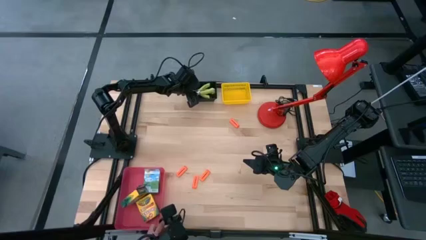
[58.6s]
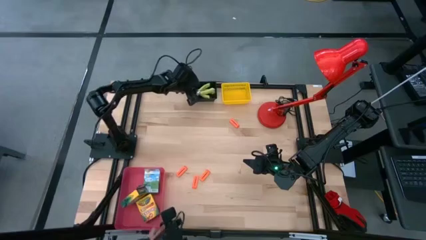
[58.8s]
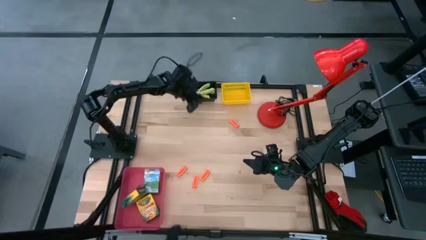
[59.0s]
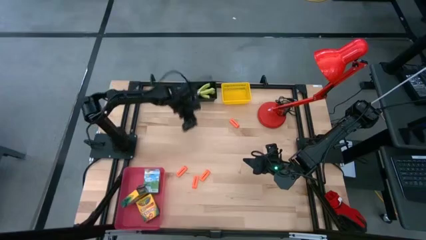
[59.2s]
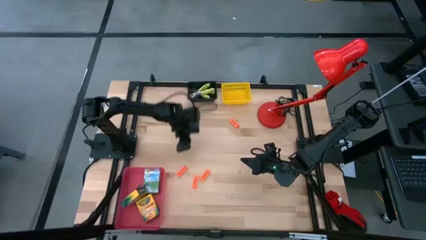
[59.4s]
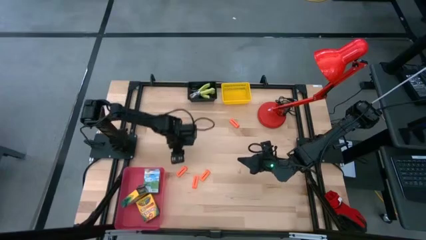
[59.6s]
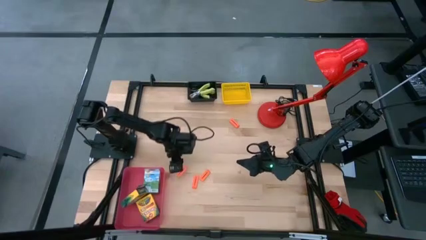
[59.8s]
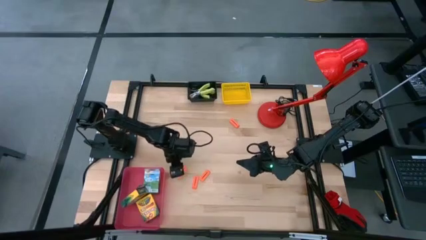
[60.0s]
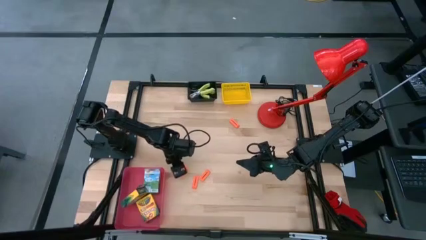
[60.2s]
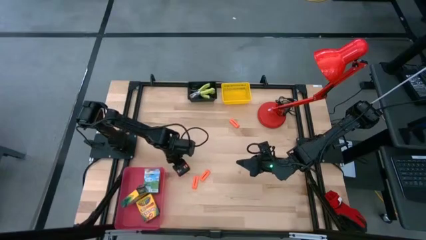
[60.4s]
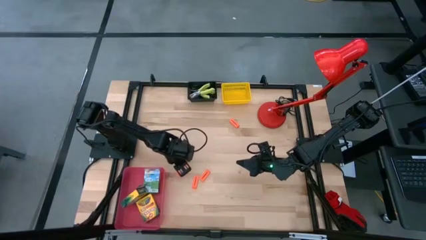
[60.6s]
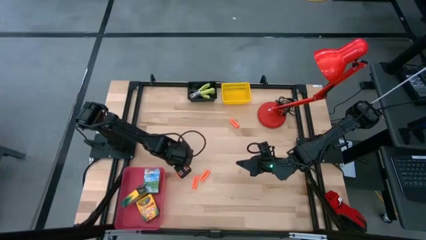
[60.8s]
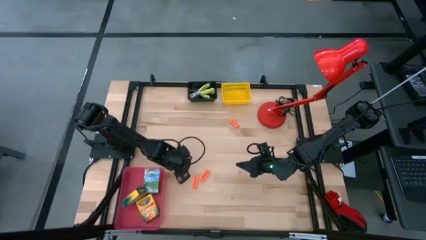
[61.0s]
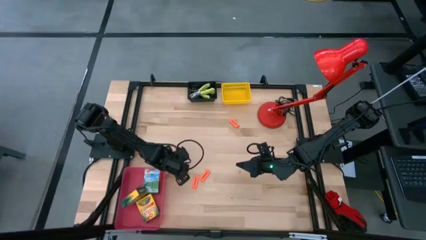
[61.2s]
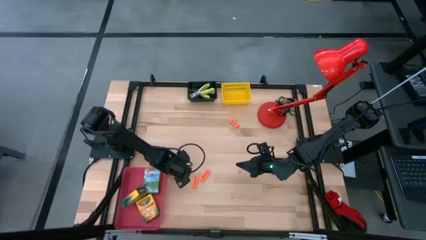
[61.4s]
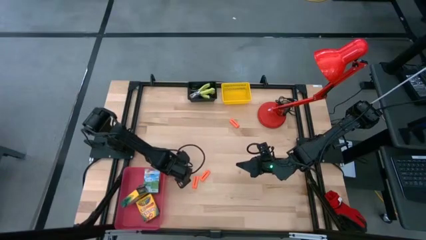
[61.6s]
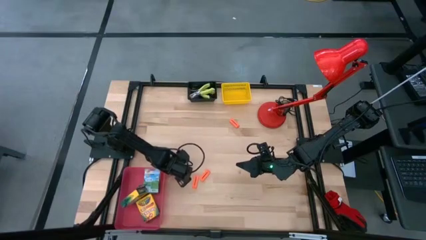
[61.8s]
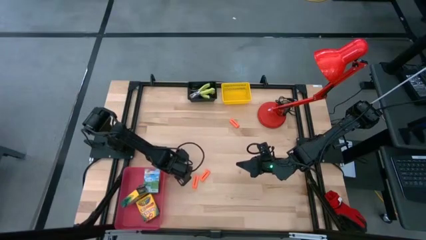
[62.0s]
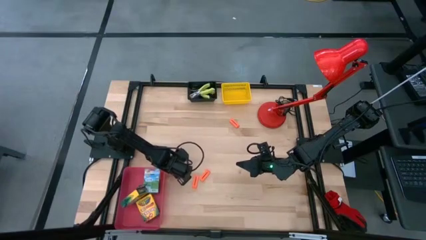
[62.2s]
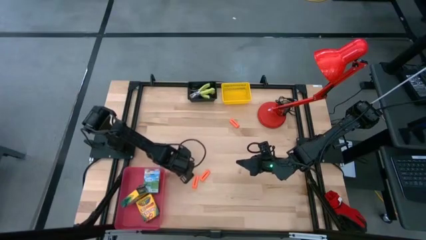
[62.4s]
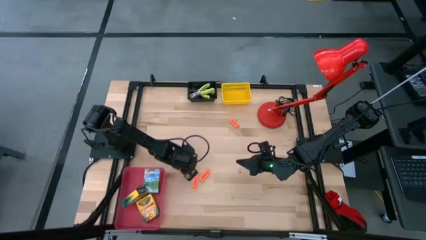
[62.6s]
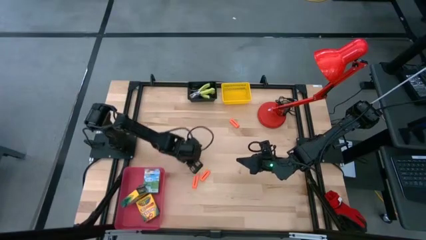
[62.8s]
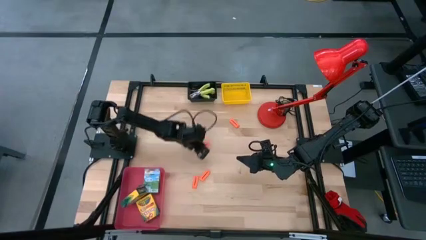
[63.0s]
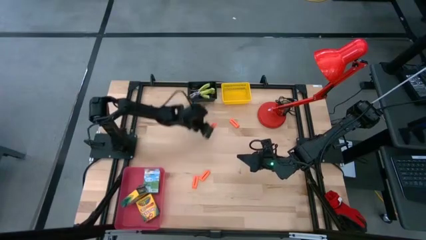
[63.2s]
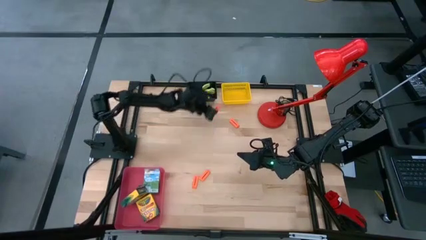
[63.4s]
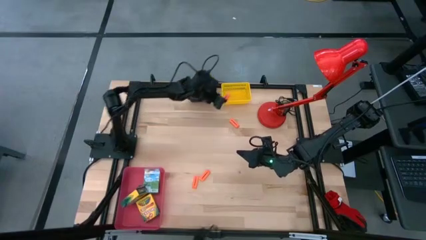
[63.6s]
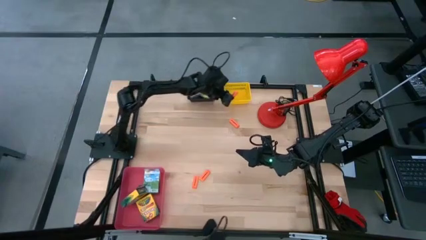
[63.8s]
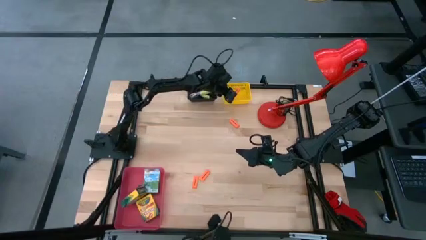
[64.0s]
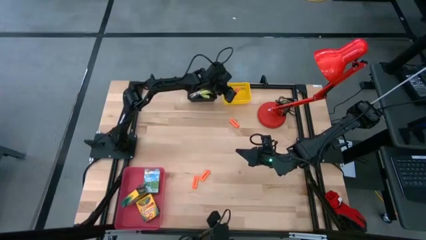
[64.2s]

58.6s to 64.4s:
Task: Pick & Place School Supplies
Put the orange eraser into the yellow bin

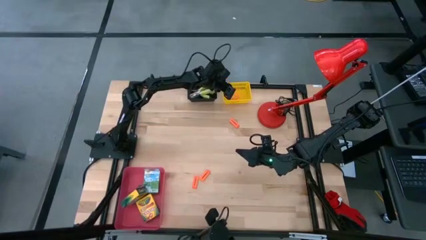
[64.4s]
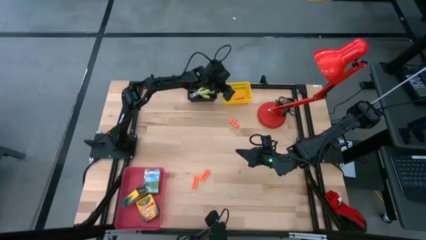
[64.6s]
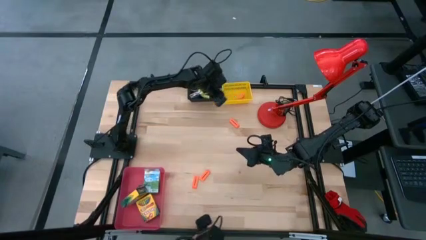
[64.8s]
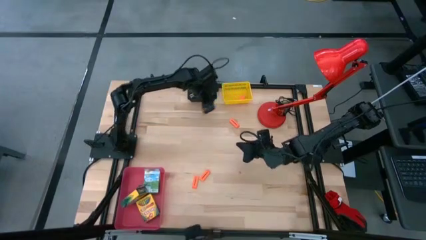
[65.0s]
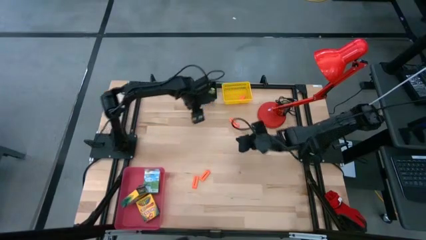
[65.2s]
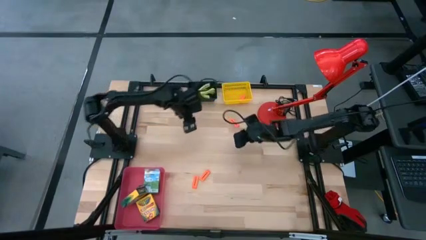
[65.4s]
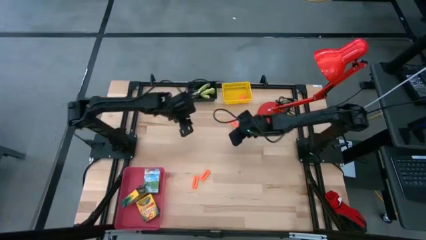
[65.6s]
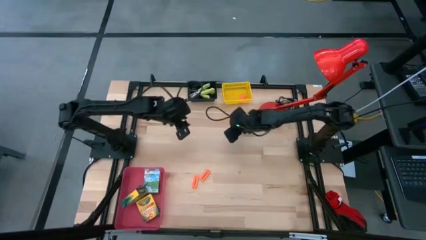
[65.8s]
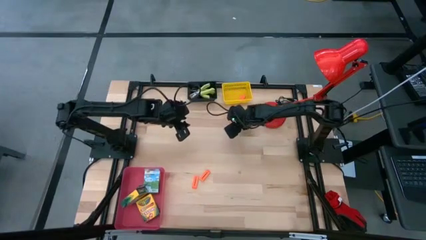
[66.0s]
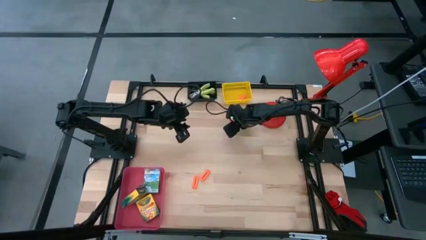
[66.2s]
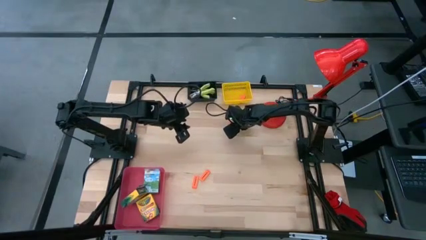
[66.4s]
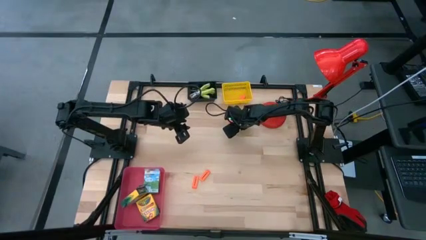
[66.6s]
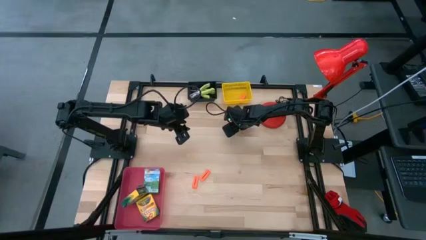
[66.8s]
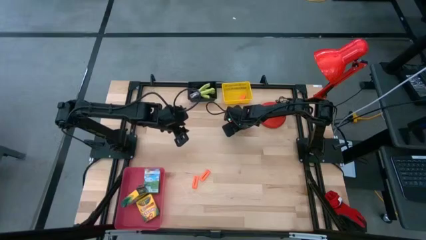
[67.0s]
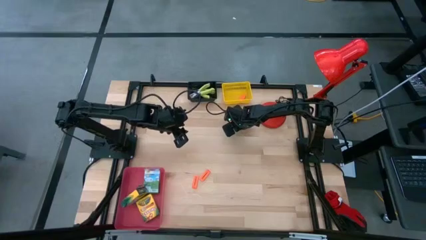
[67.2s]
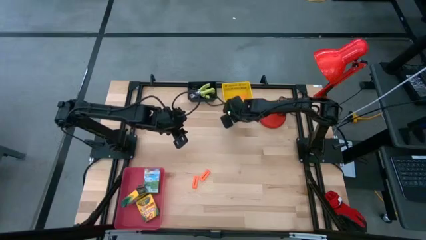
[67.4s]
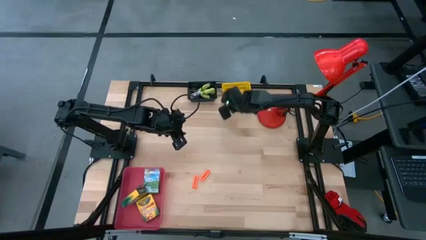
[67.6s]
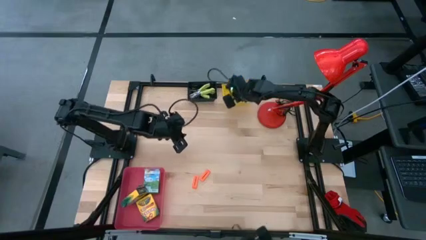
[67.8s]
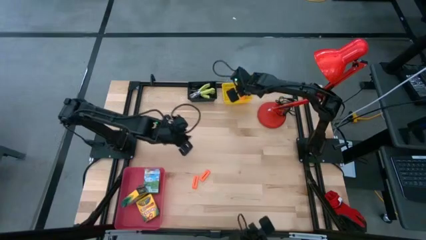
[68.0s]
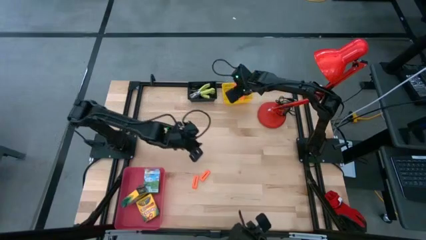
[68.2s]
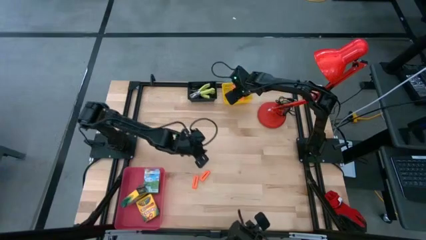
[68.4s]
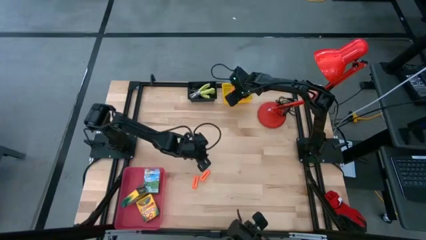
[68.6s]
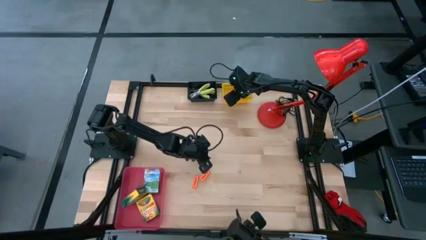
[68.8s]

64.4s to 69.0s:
Put the orange eraser into the yellow bin

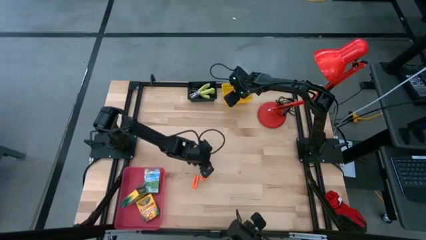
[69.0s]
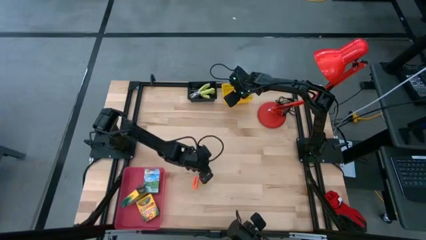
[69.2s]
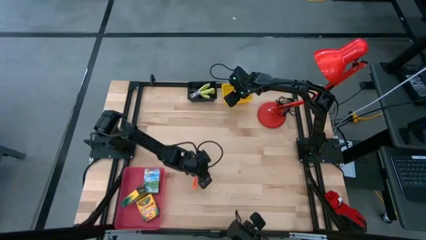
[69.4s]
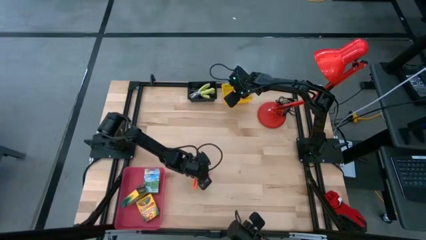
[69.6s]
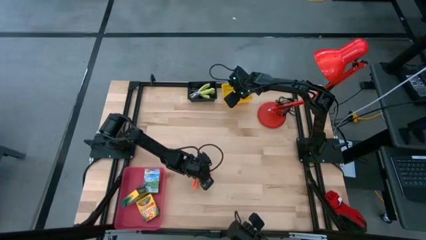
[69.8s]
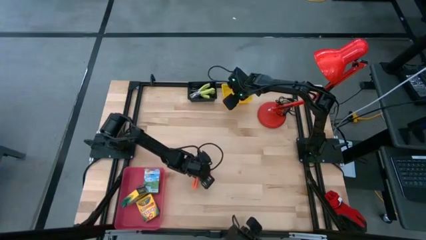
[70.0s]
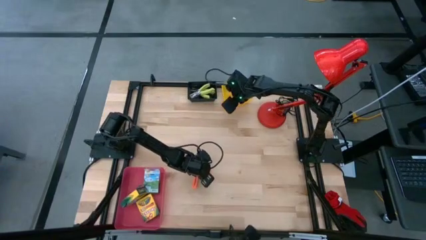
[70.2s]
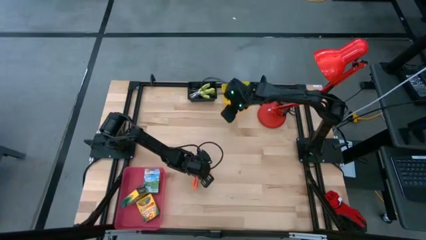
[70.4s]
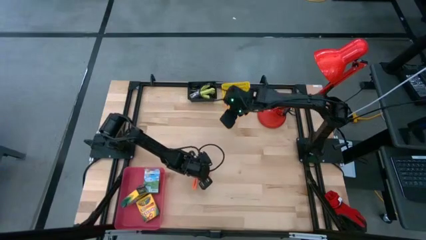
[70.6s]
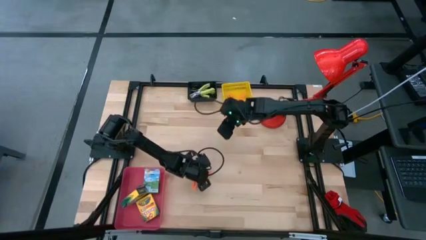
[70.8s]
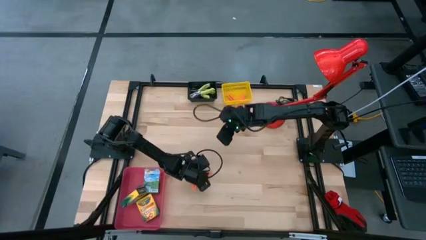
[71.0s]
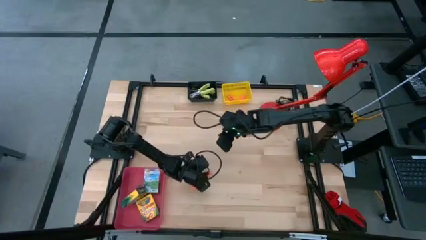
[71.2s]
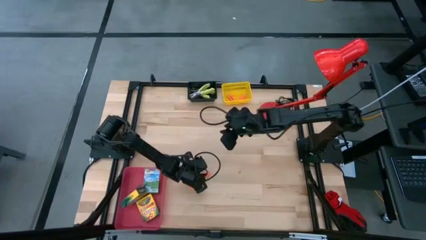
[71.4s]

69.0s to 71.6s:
Put the orange eraser into the yellow bin

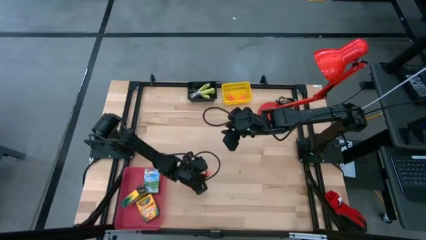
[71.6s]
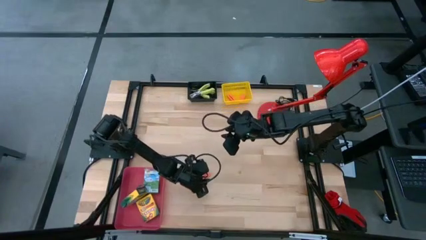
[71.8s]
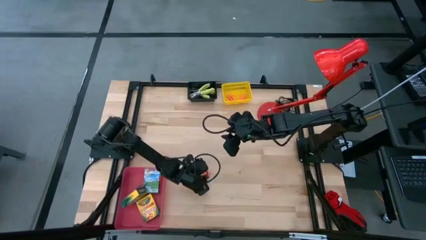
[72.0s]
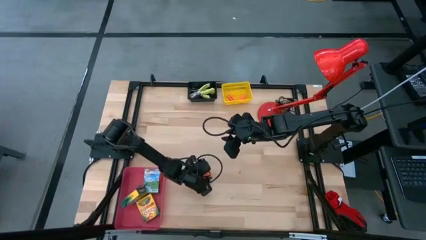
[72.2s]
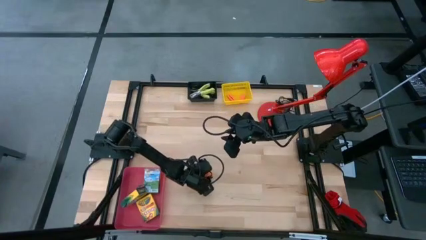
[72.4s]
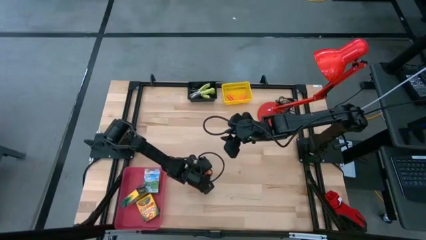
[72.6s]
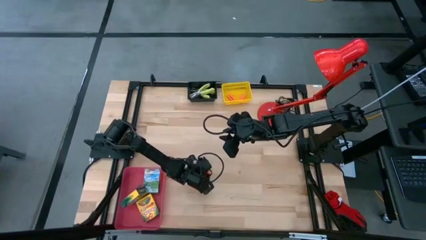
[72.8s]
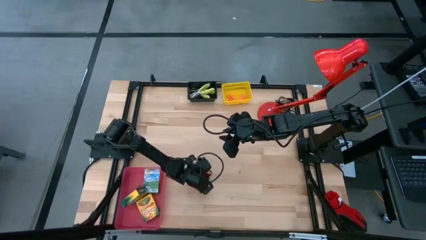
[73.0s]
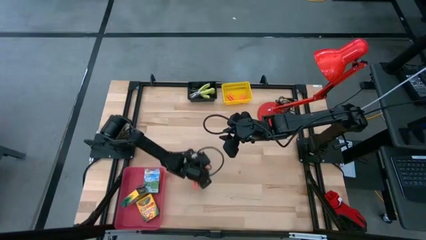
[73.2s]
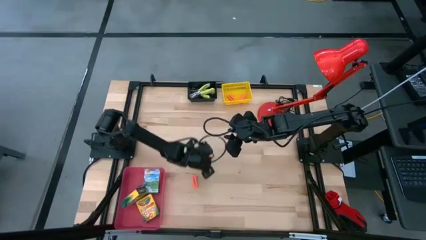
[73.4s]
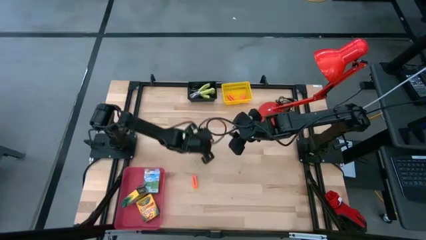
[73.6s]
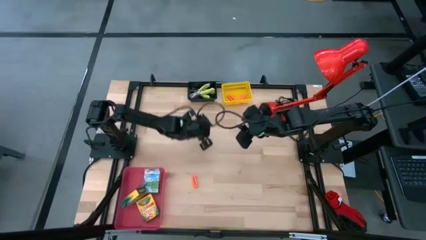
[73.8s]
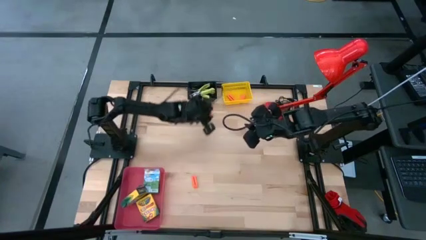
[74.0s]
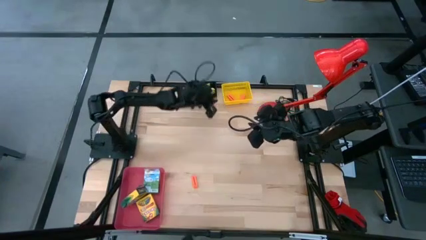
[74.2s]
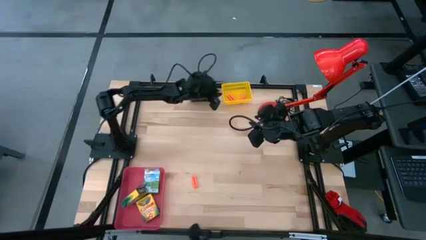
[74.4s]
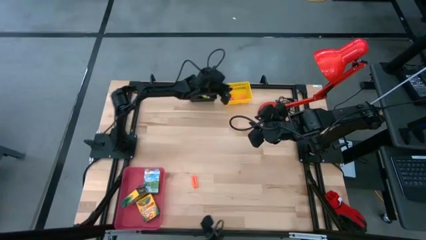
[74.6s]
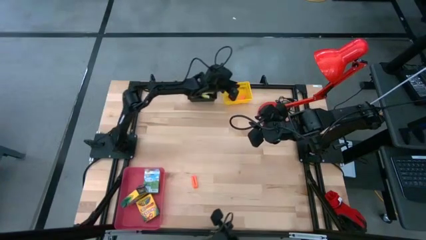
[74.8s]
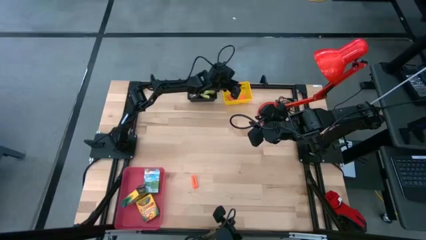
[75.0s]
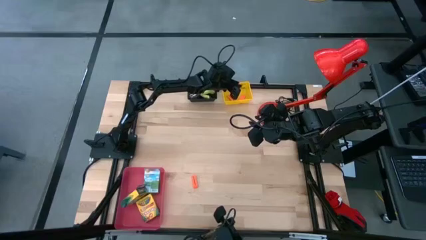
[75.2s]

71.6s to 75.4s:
Put the orange eraser into the yellow bin
